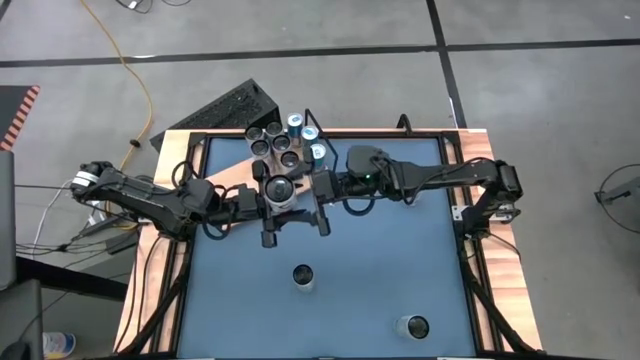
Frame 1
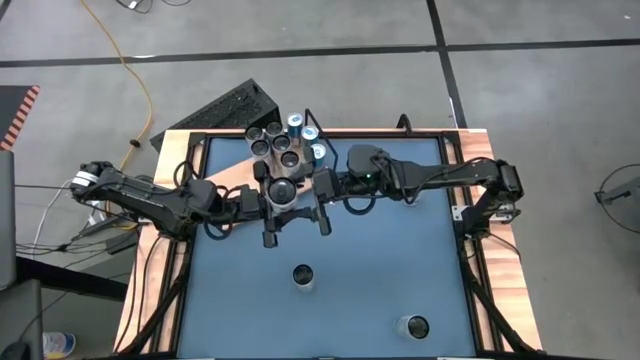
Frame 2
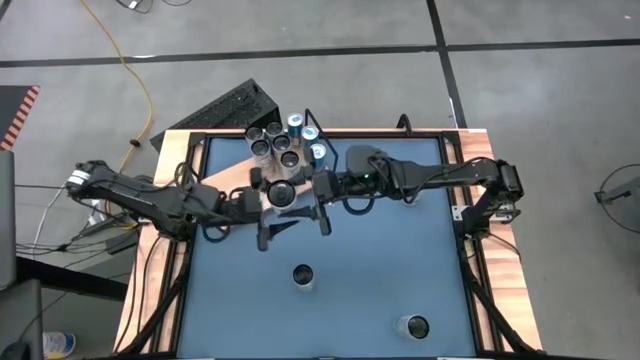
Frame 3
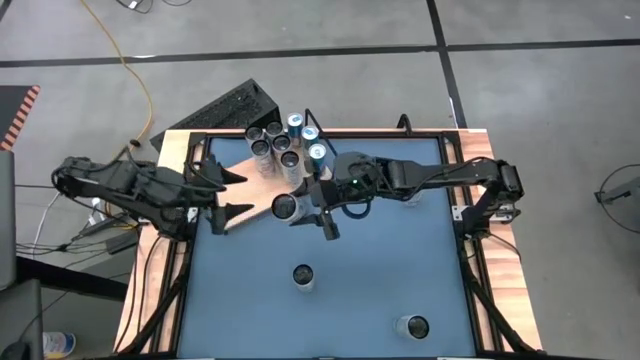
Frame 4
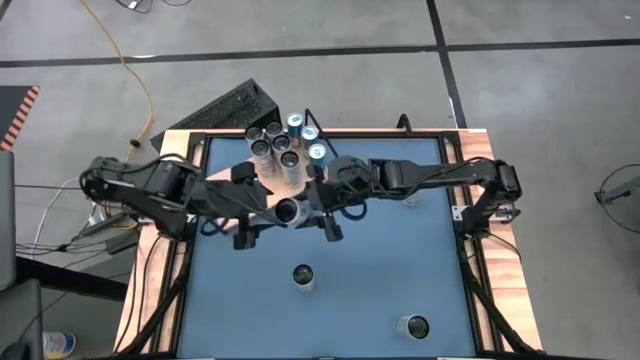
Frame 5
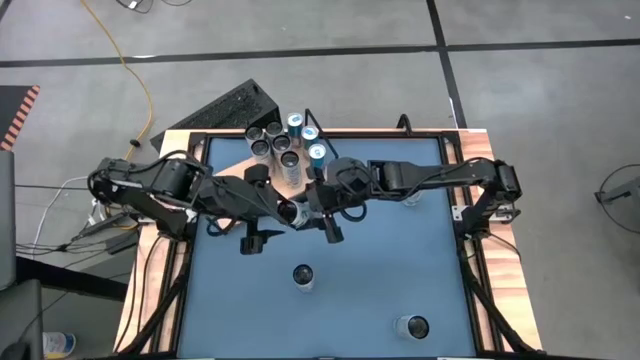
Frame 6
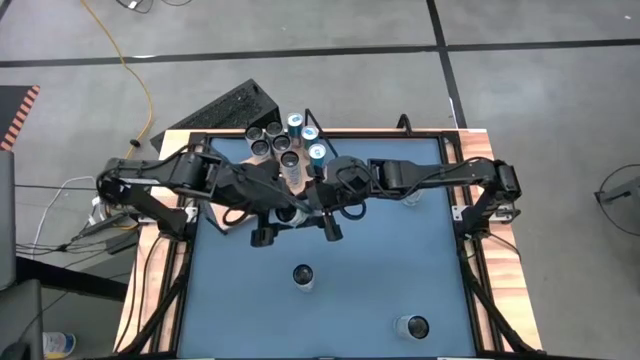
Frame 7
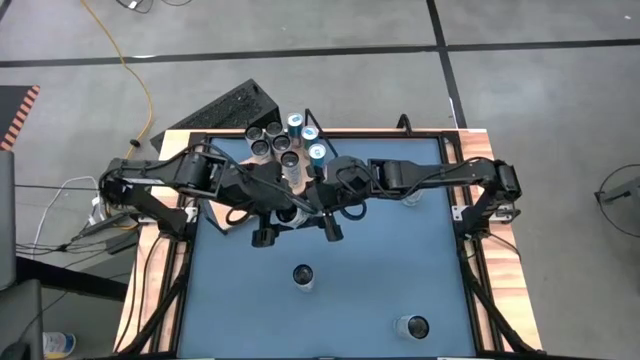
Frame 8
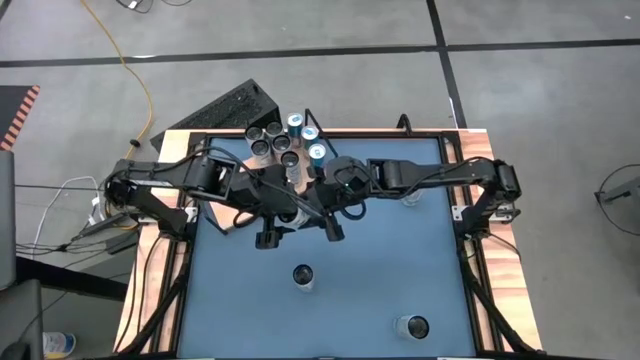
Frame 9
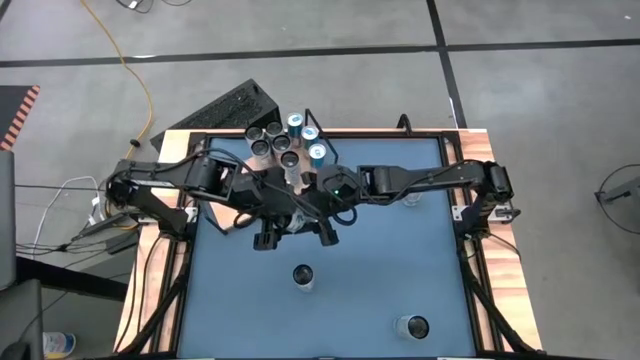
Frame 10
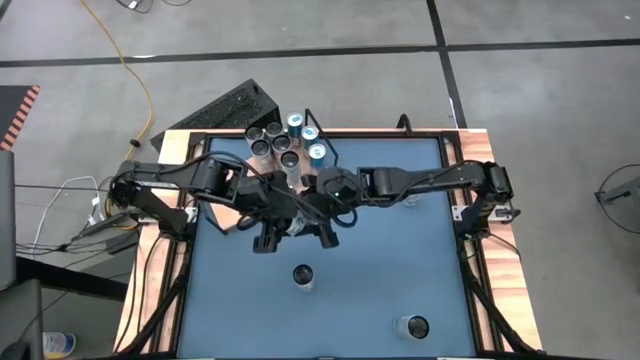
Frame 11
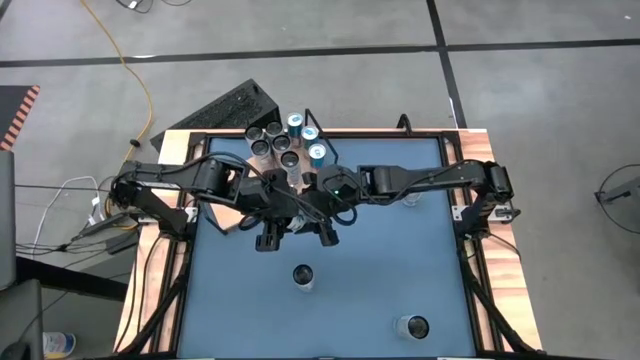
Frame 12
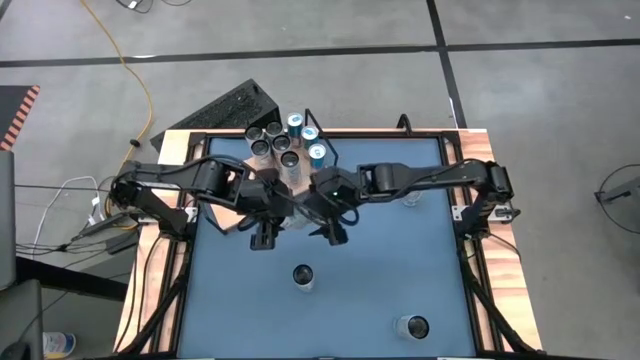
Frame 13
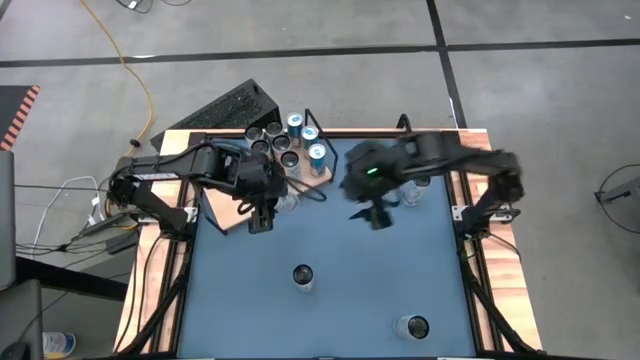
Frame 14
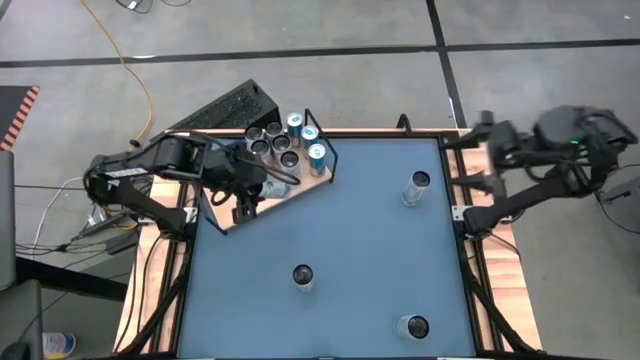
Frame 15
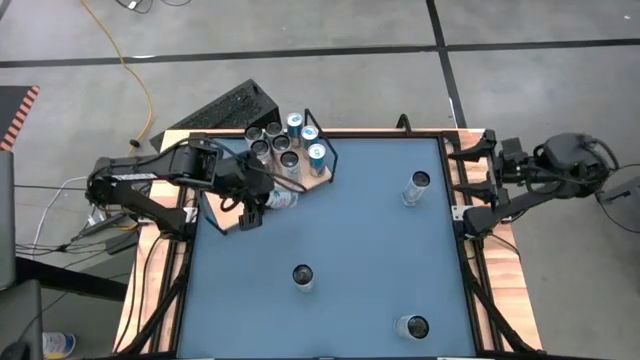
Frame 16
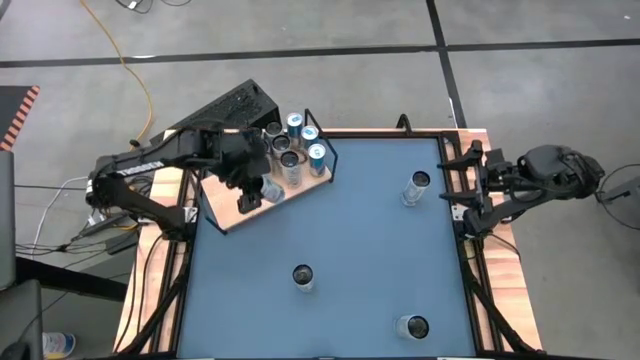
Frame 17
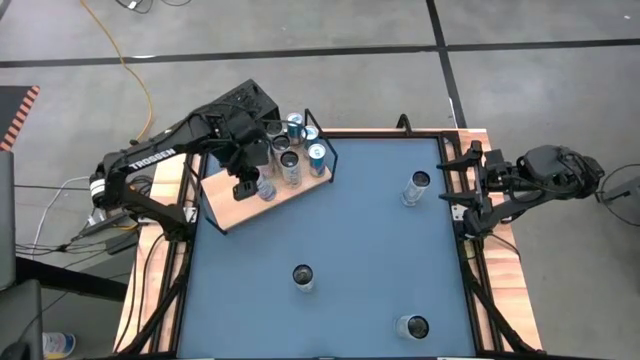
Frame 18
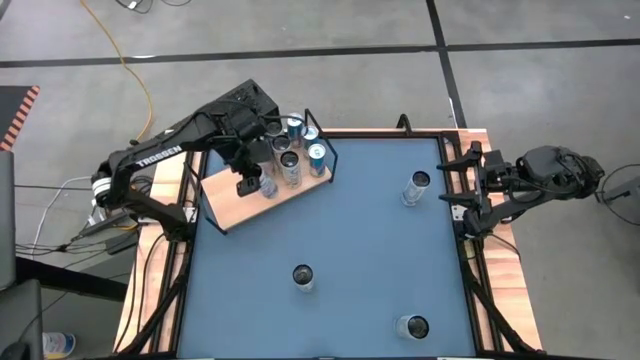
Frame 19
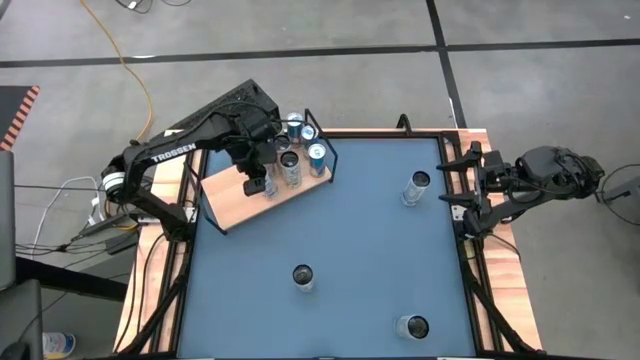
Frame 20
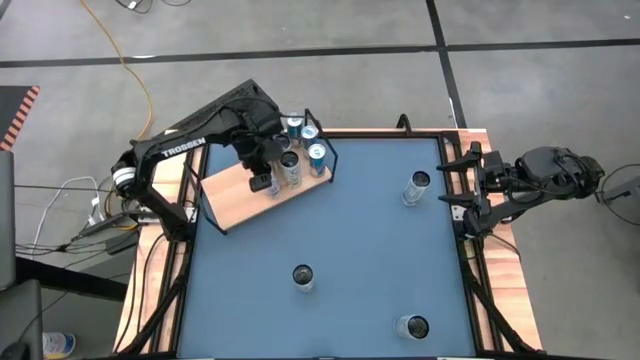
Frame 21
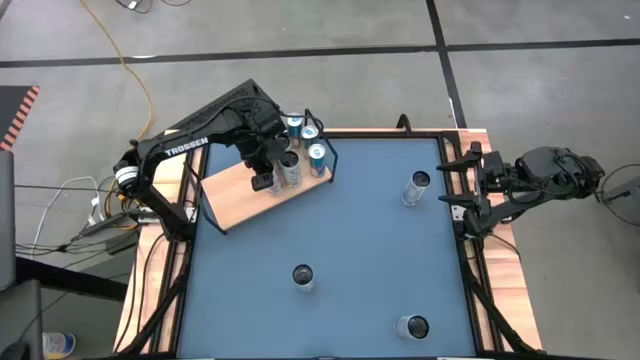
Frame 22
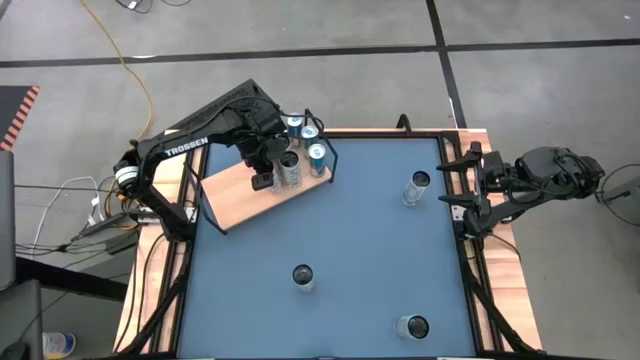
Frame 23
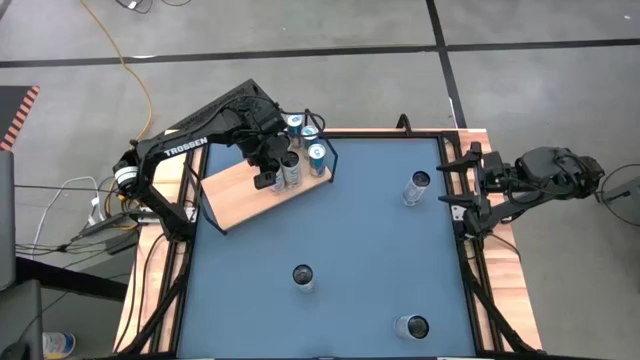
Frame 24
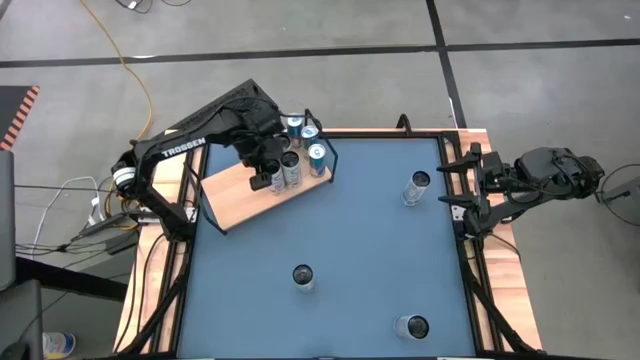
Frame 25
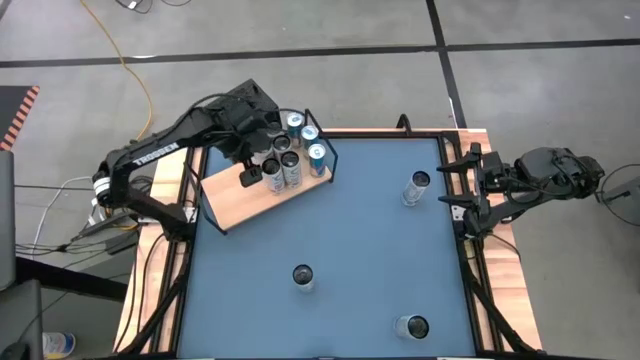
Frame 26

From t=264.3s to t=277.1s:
Task: Place canned beverage on shelf
Put the white and pink soda can on the shelf aligned with the other white and pink soda cans

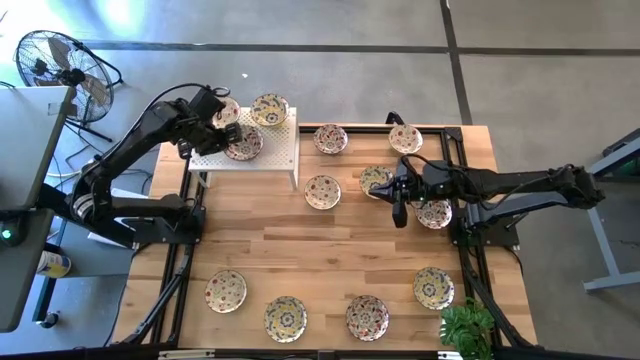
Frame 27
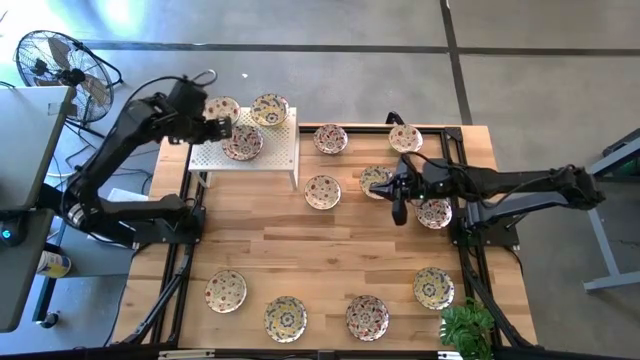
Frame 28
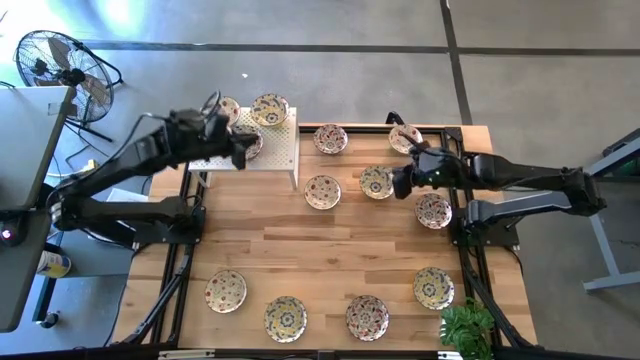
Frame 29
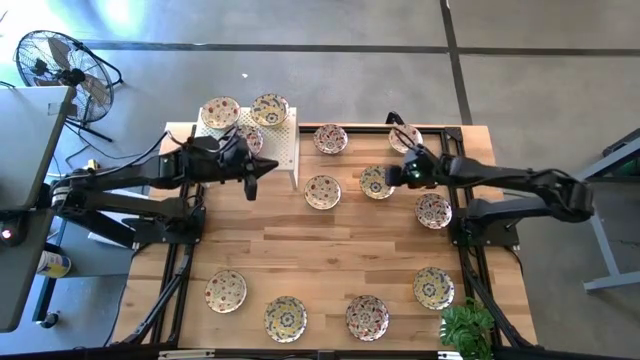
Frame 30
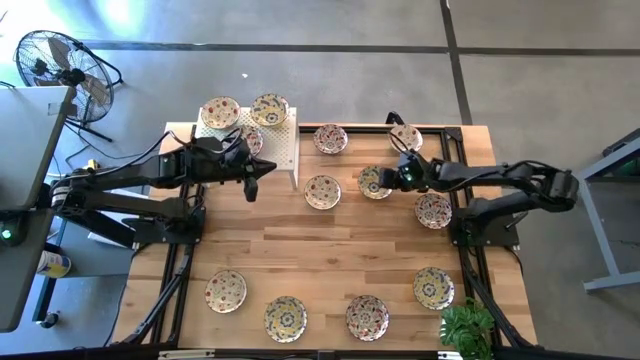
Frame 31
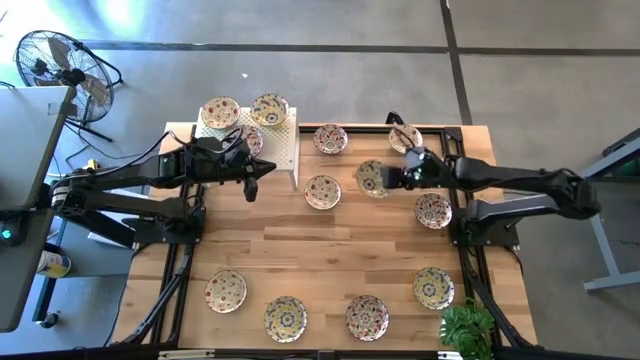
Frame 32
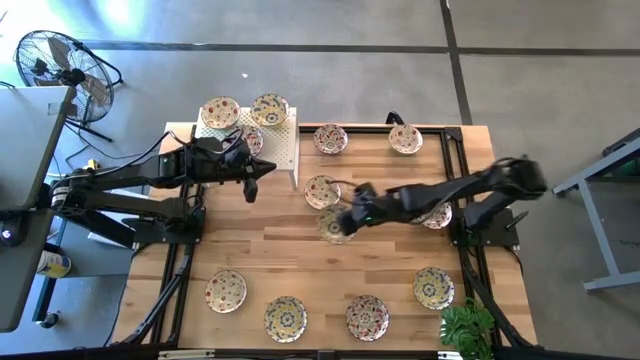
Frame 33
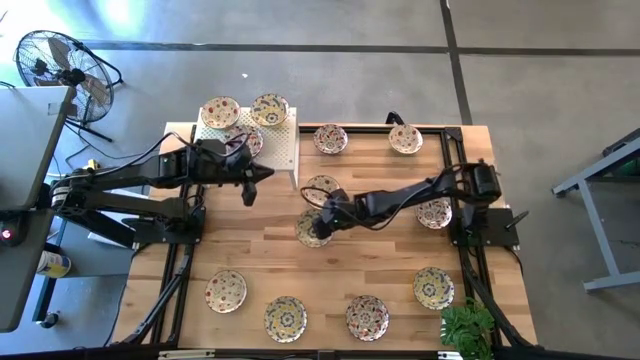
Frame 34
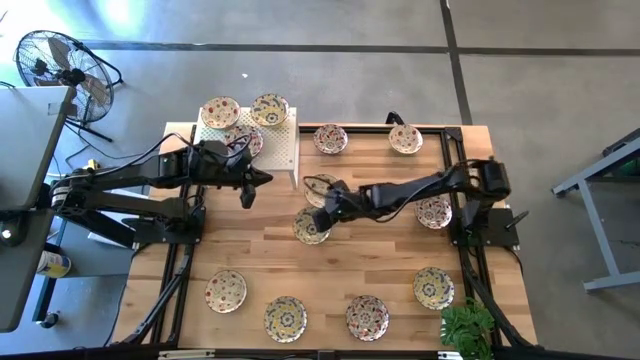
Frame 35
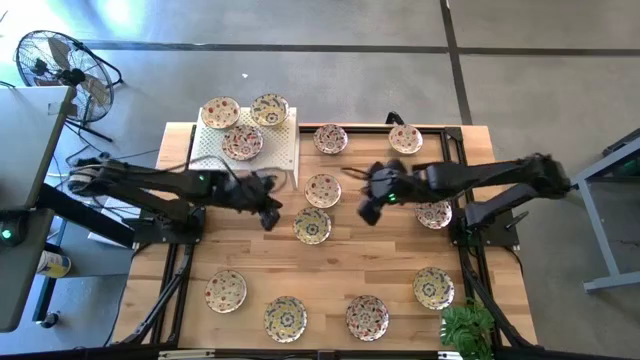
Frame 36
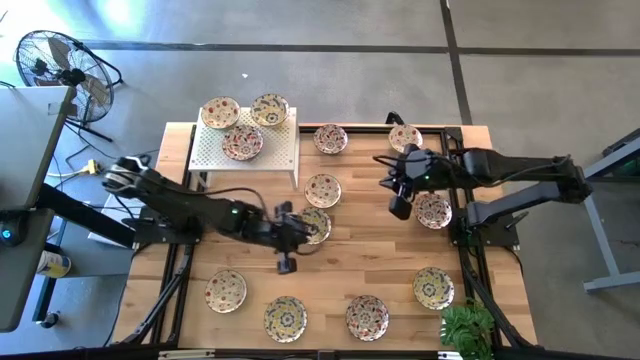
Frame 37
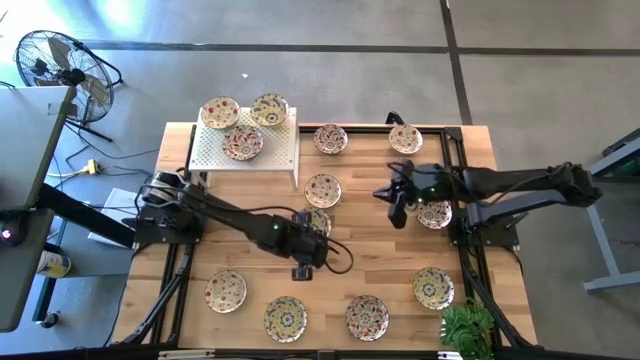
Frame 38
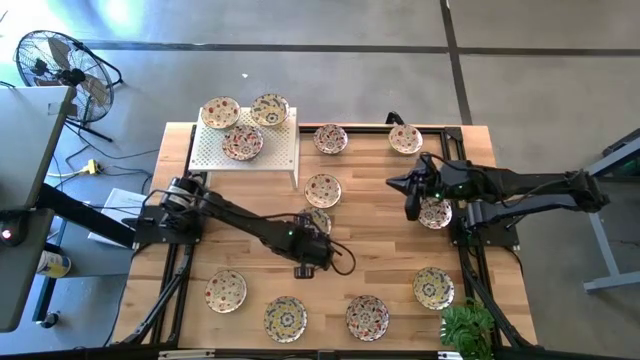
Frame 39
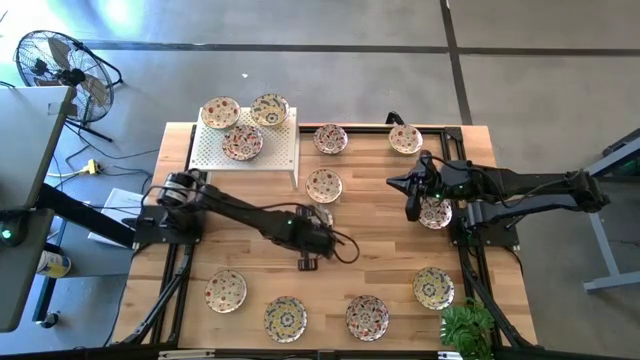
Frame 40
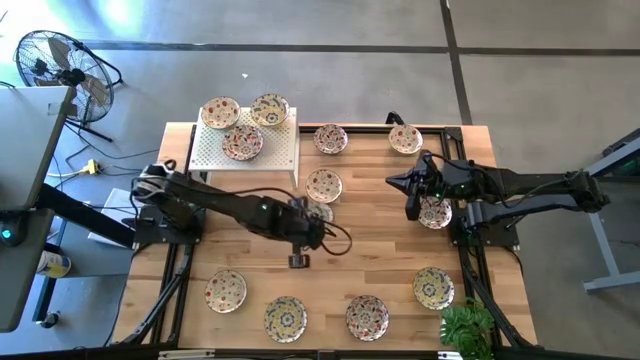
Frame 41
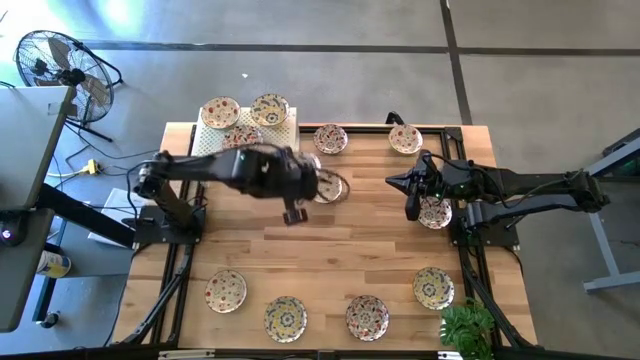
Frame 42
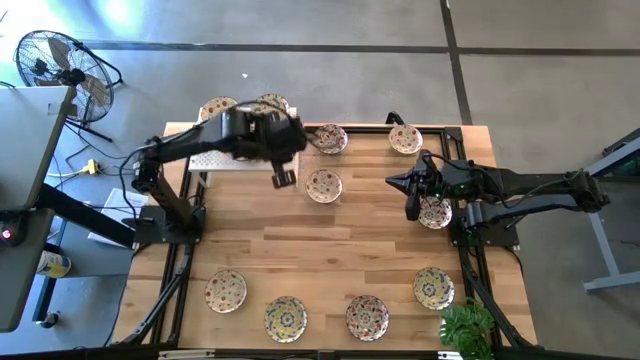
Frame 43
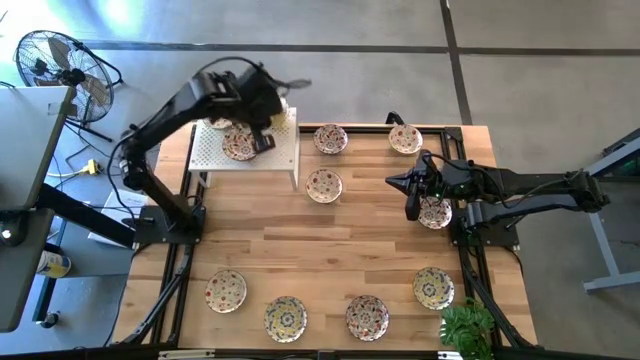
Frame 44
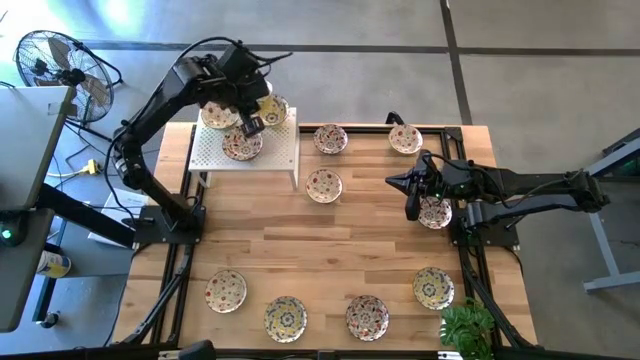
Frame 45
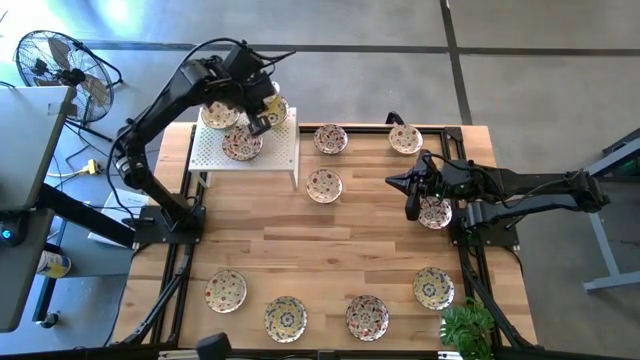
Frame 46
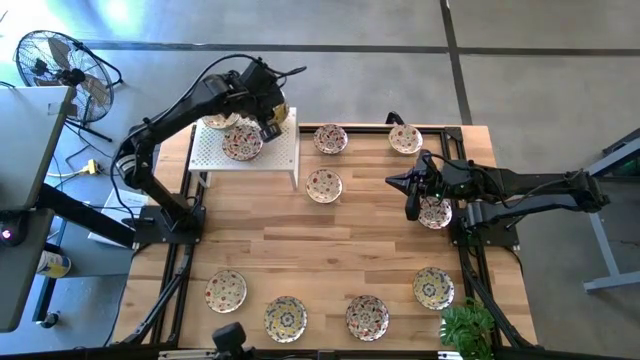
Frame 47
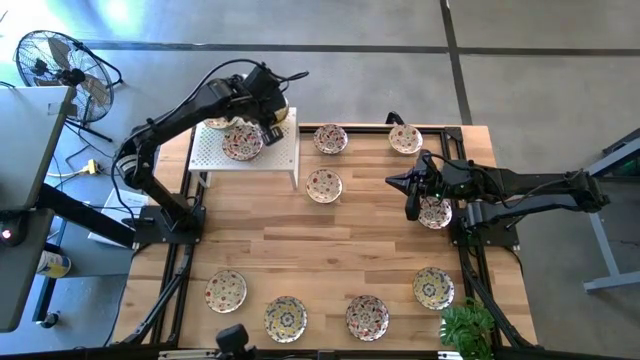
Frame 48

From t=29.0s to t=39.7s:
Task: Pick & Place Mini bowls
Stack the yellow patterned bowl on the yellow patterned bowl on the shelf
